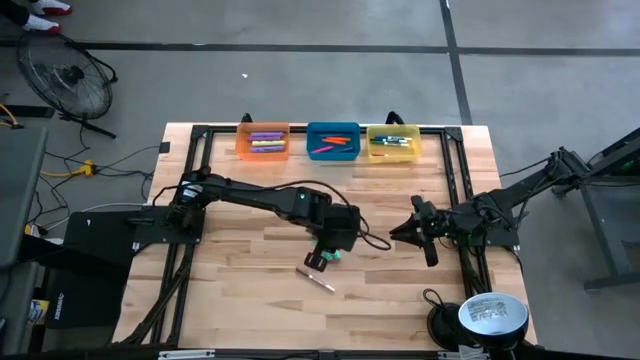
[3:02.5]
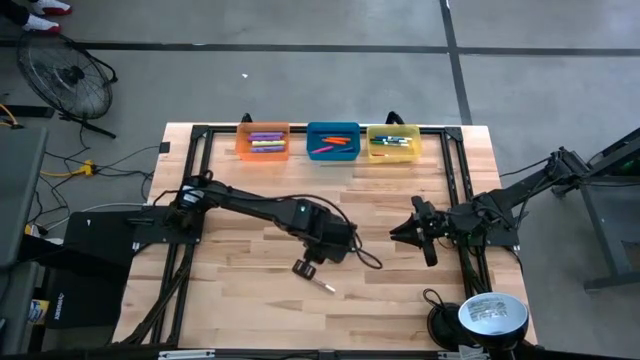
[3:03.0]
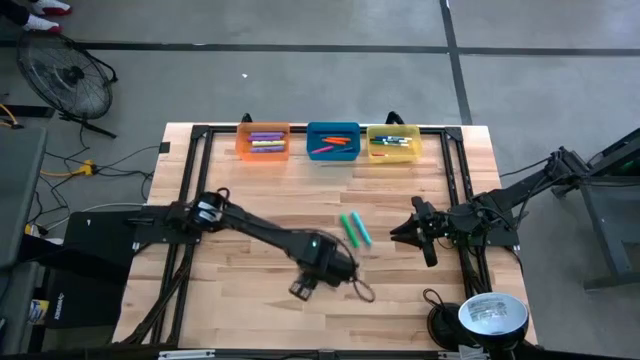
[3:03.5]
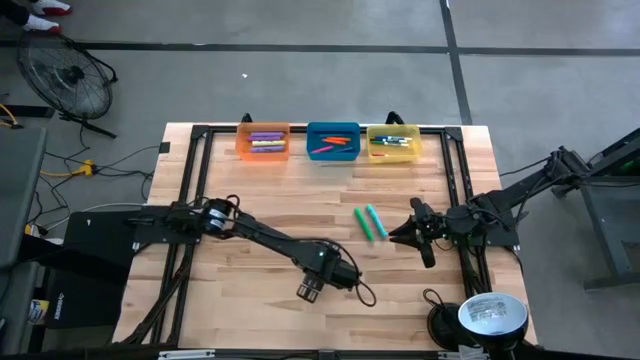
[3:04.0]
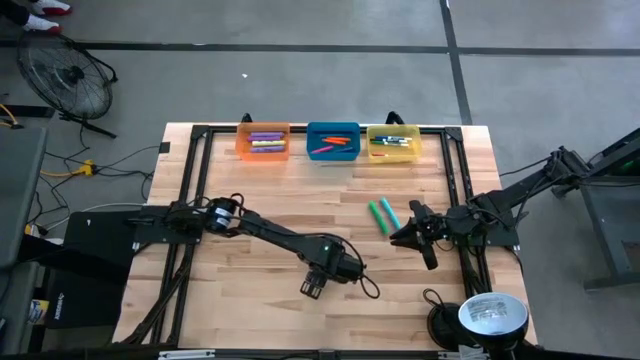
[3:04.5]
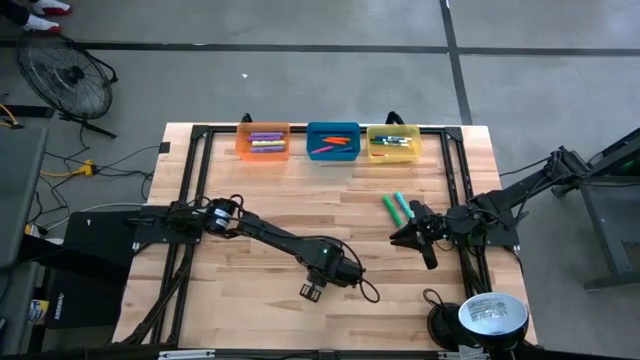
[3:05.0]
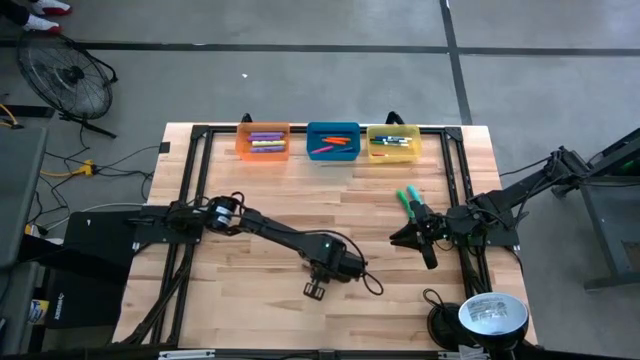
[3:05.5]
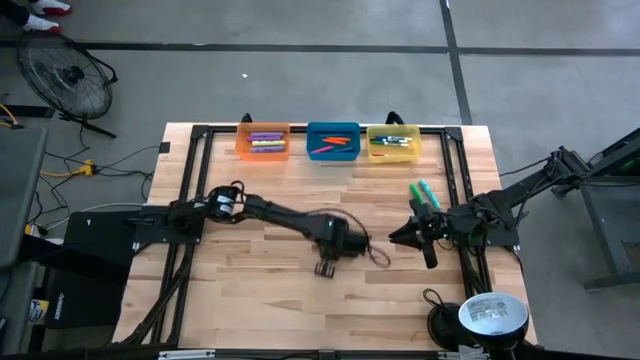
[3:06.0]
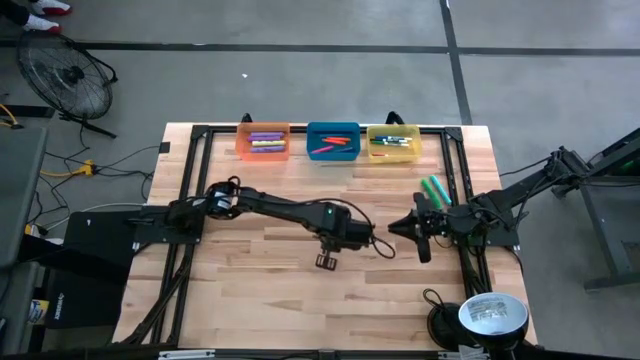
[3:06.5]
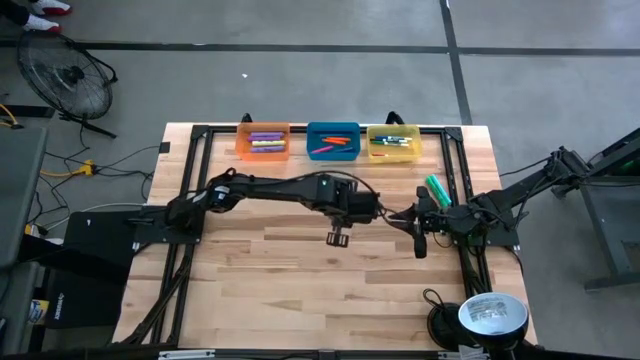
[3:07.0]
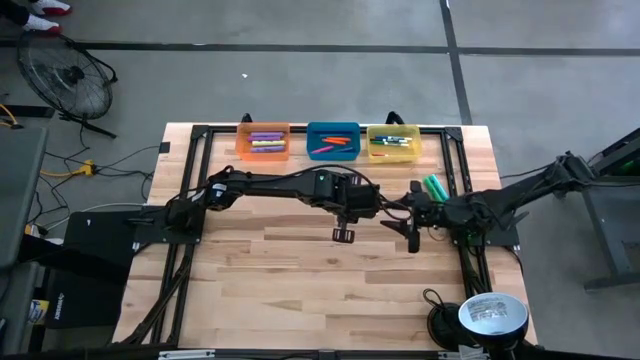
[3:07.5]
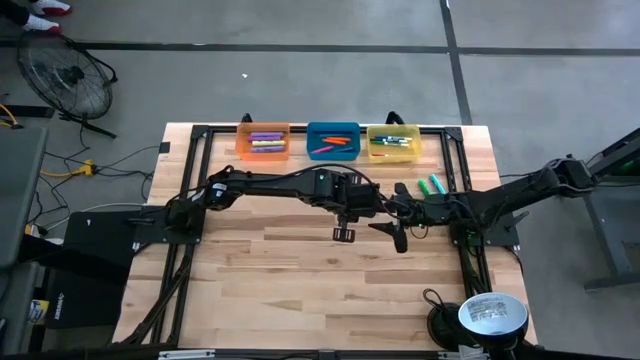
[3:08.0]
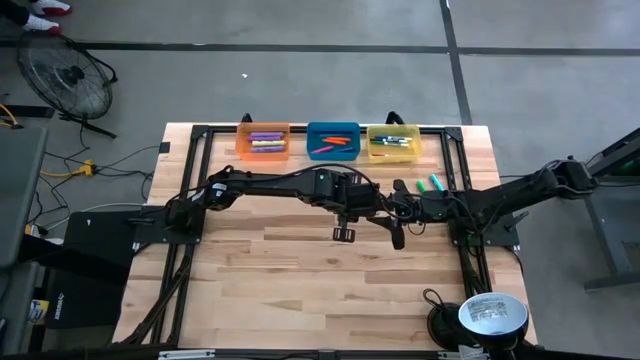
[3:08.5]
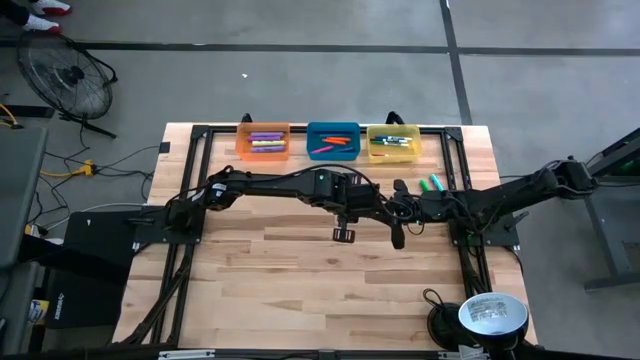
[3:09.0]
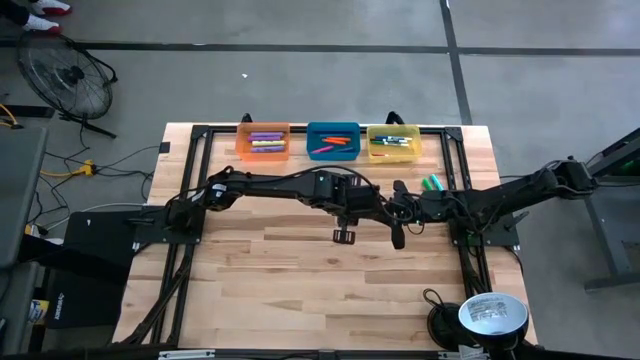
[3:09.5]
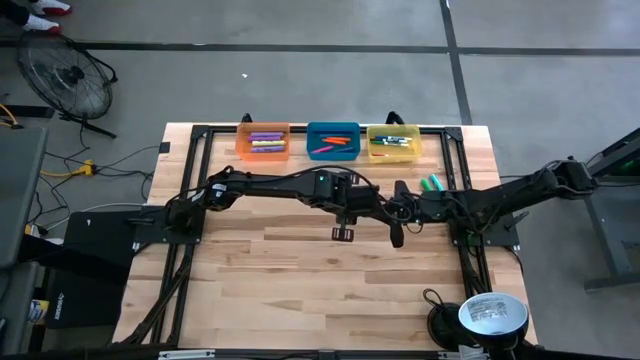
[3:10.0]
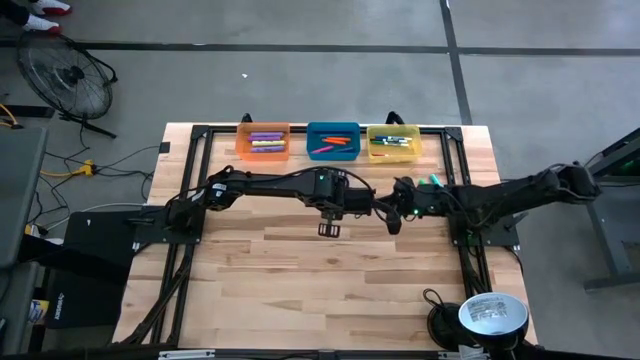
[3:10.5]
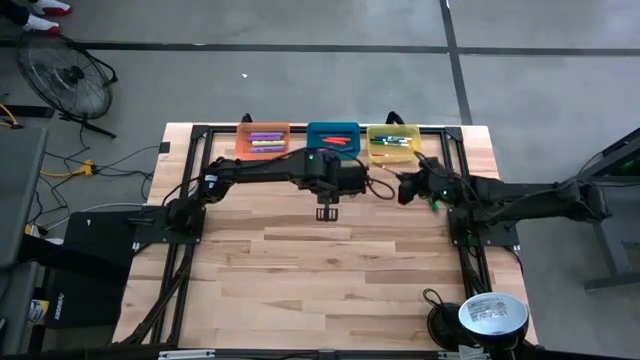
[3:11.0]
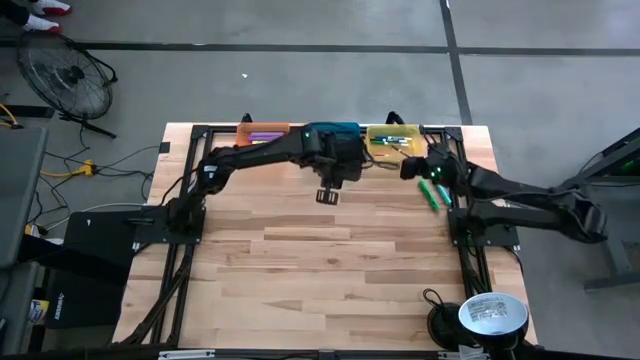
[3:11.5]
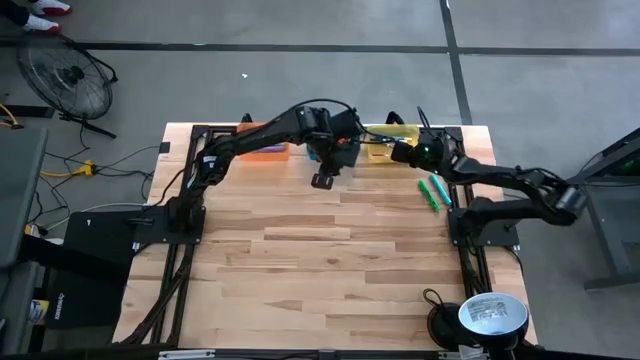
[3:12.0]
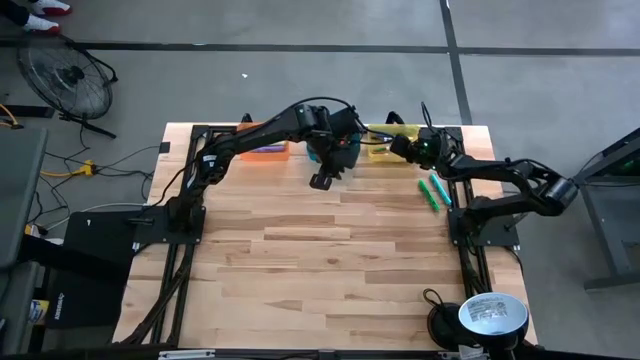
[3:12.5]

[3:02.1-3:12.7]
Task: Pick & Place Markers
Put the brown marker into the yellow bin

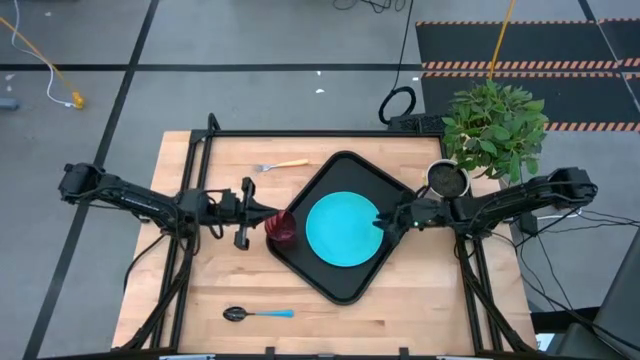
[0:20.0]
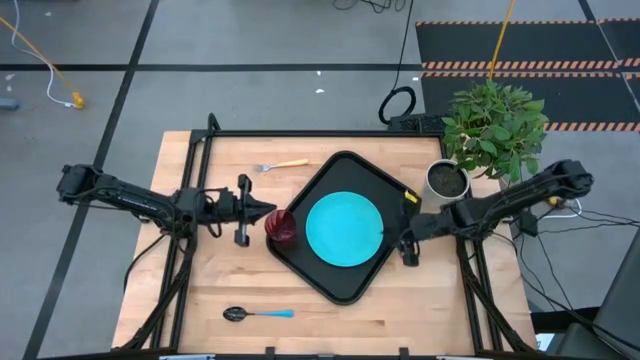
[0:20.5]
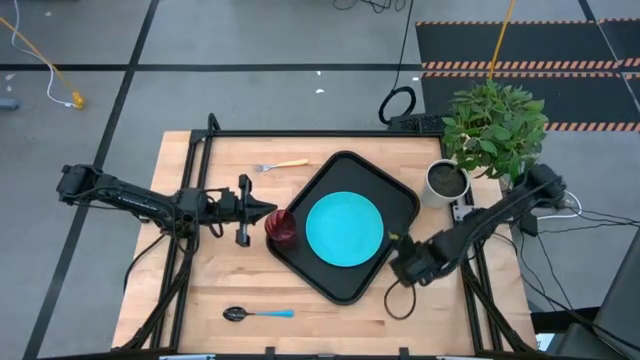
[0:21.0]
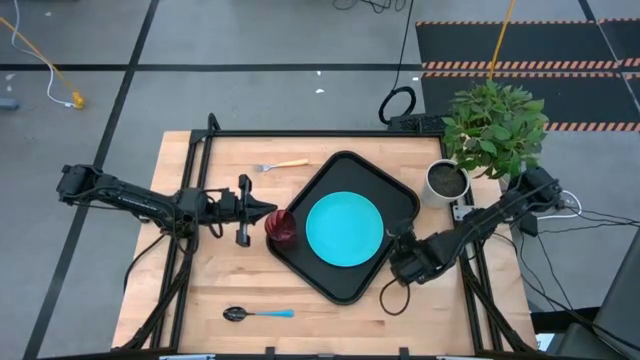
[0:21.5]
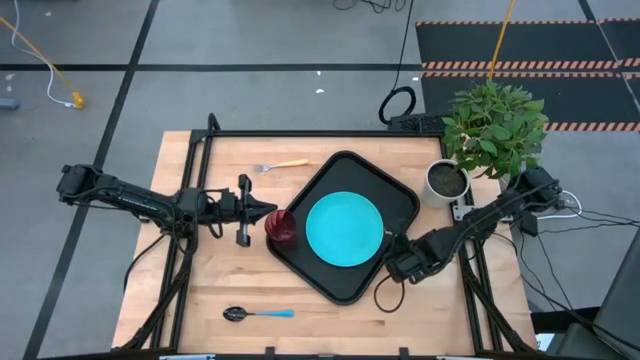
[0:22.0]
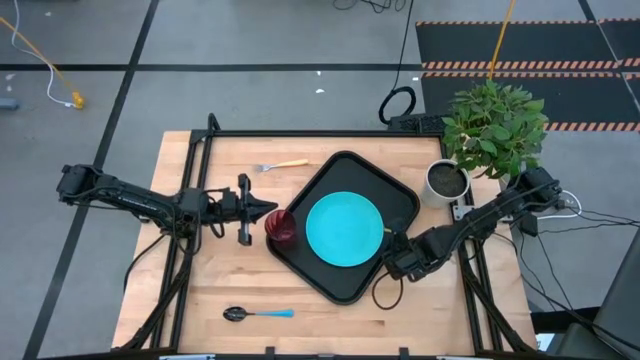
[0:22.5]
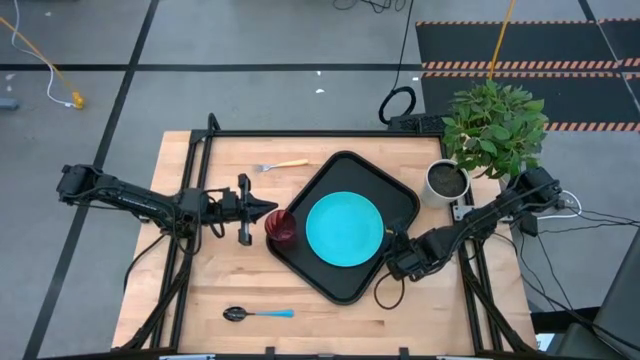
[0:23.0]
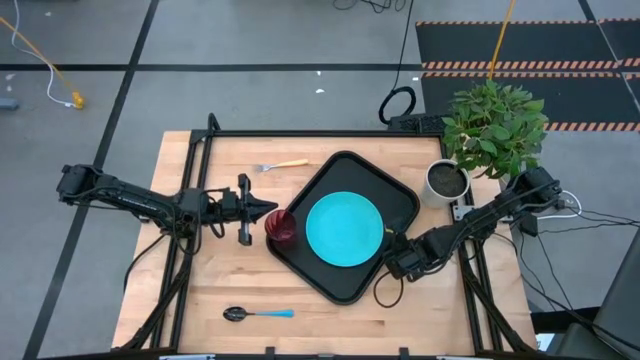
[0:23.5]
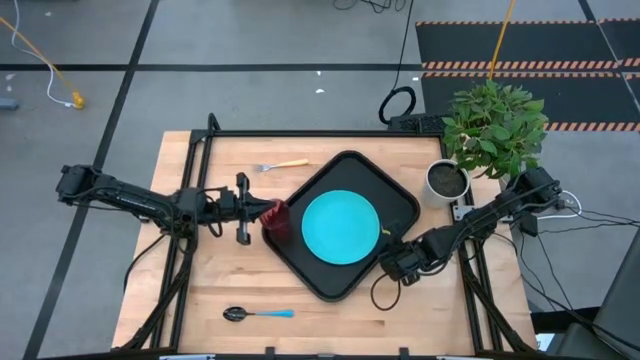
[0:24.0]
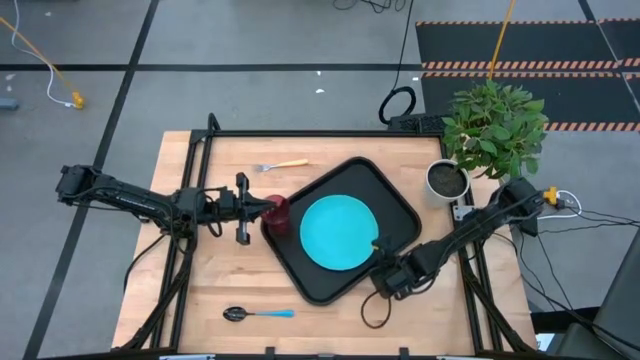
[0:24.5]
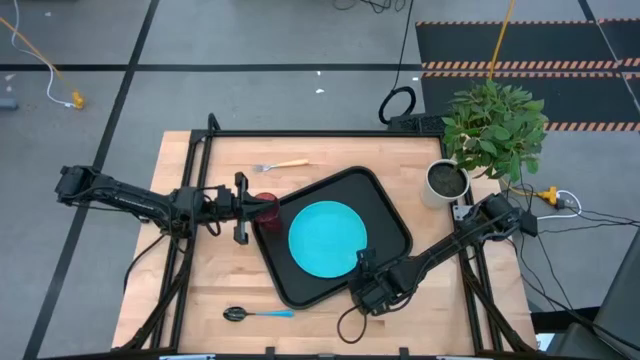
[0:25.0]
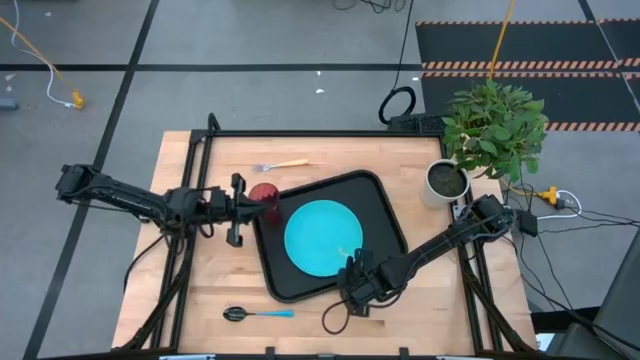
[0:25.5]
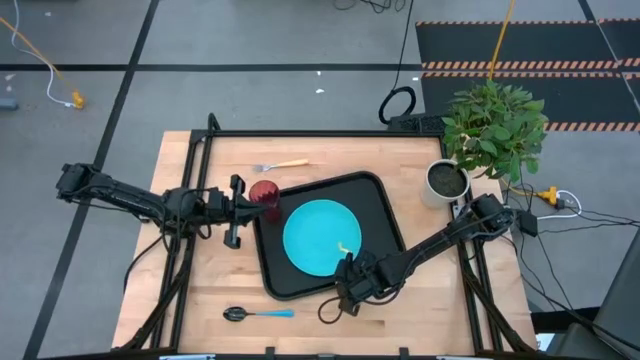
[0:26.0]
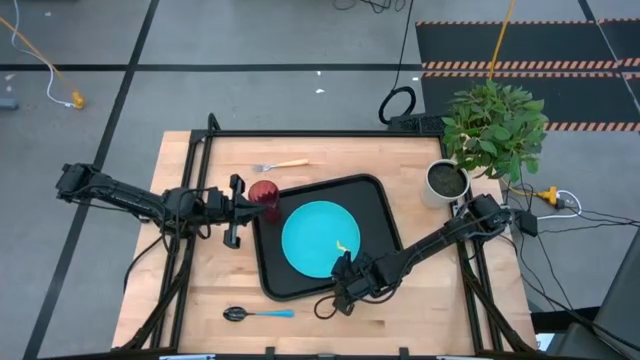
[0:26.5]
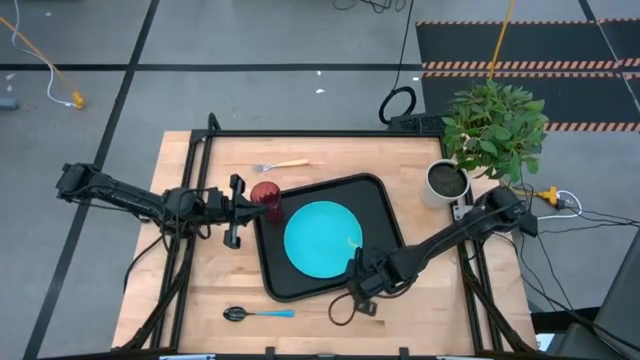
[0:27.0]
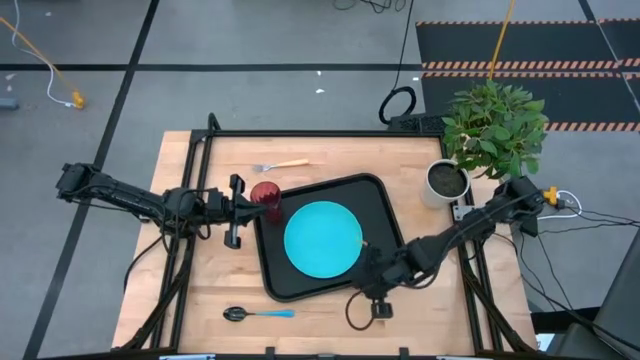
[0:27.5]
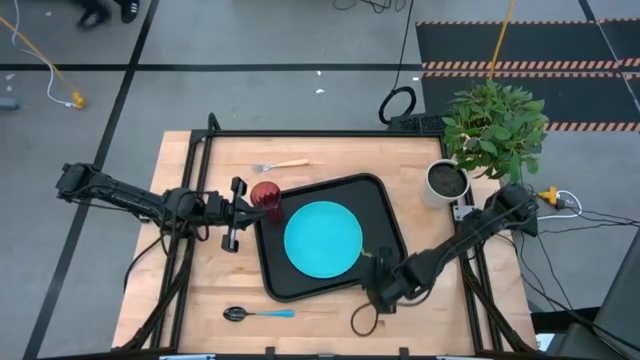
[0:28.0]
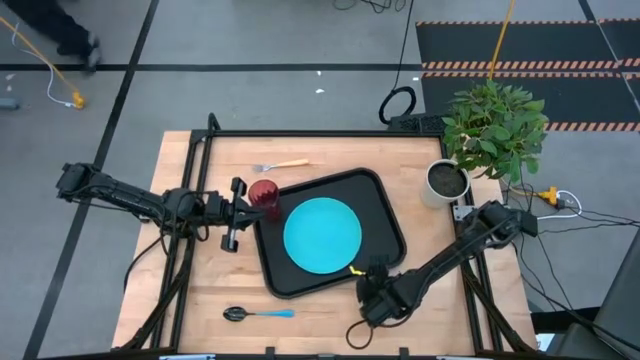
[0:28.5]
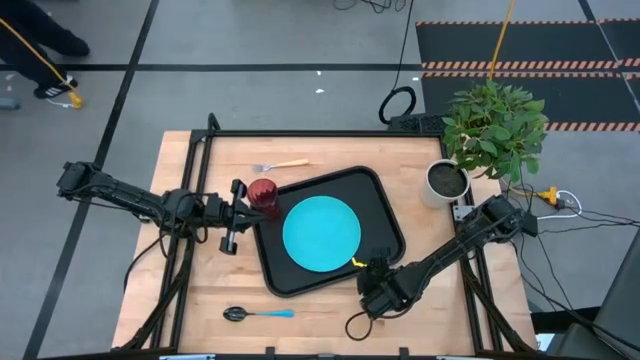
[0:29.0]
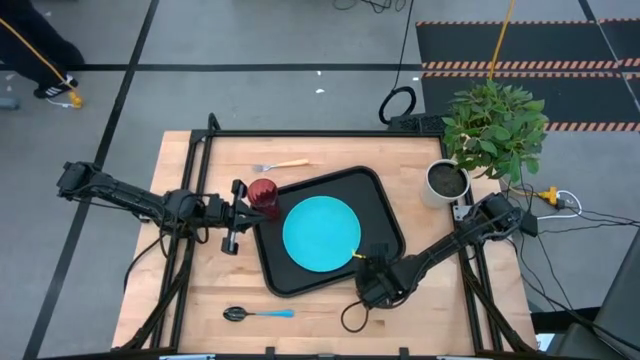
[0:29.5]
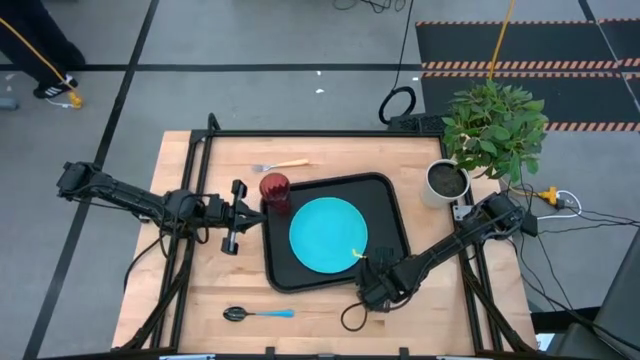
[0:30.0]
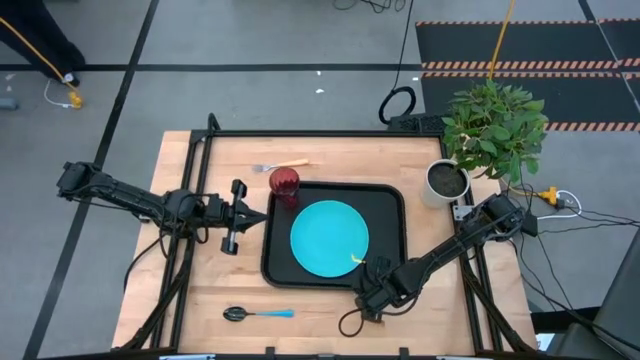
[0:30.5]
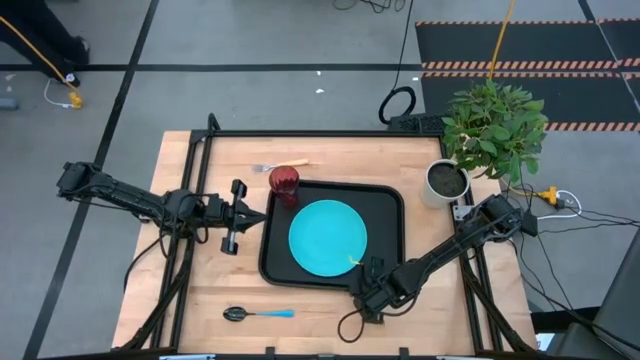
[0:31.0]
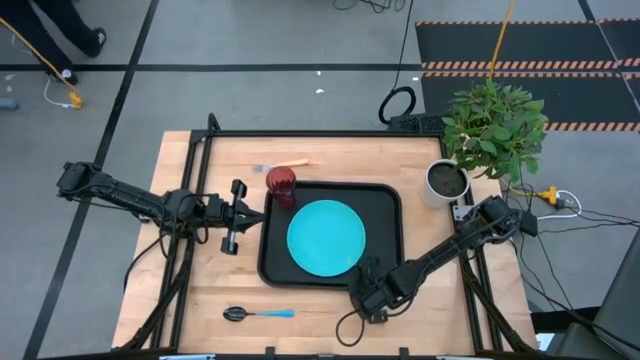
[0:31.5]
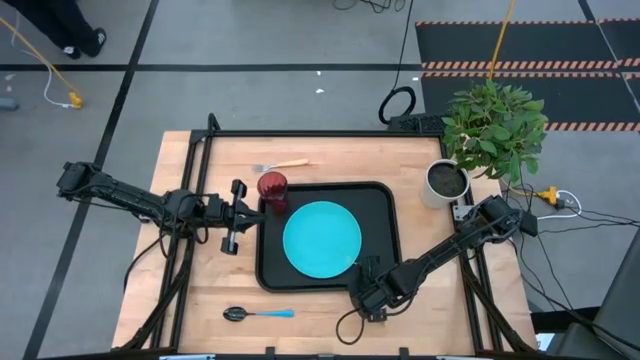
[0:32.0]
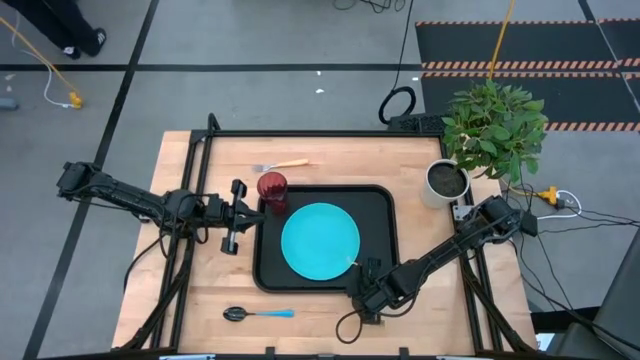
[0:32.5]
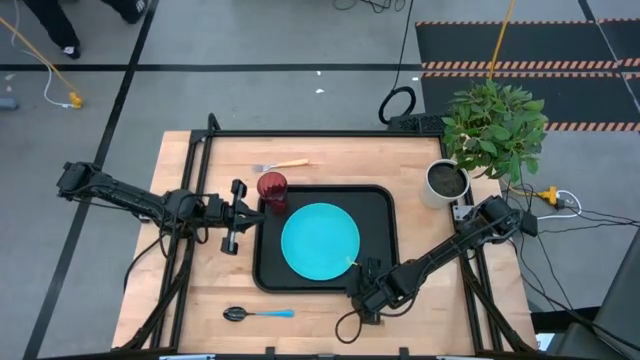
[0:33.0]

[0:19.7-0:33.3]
Task: Pick and place plate/cup/fork/spoon on tray
Adjust the black serving tray
